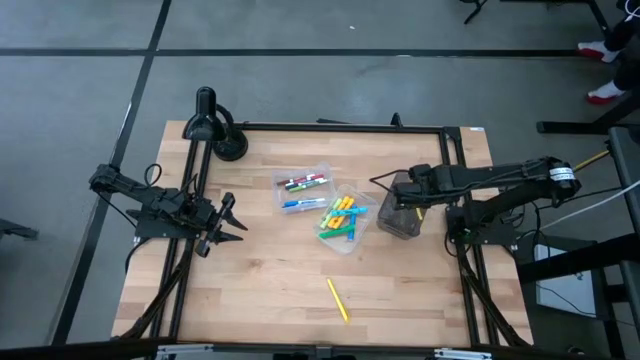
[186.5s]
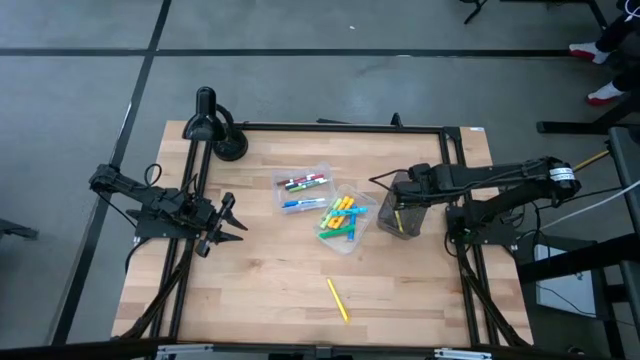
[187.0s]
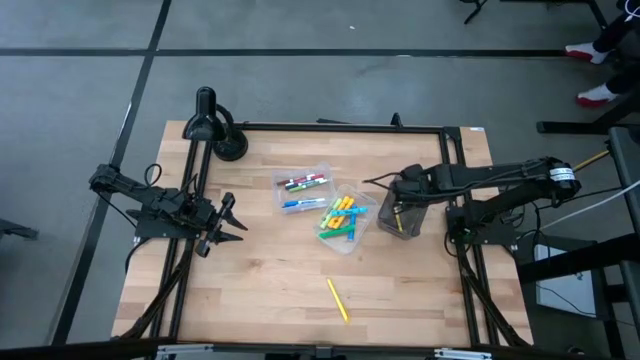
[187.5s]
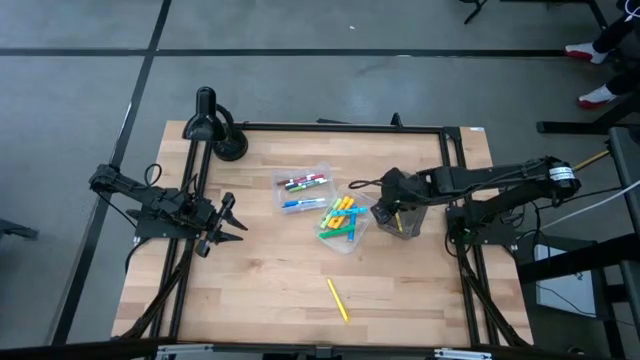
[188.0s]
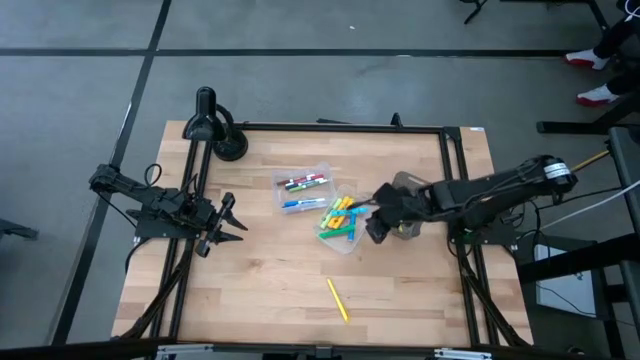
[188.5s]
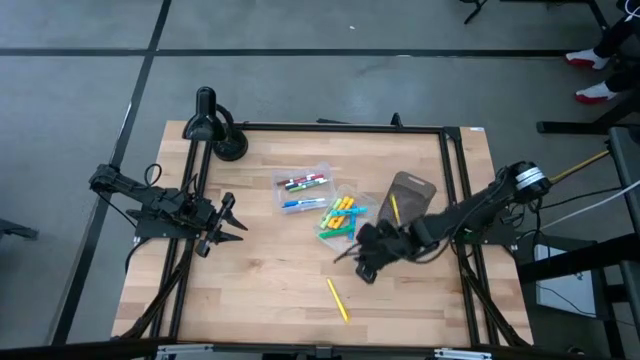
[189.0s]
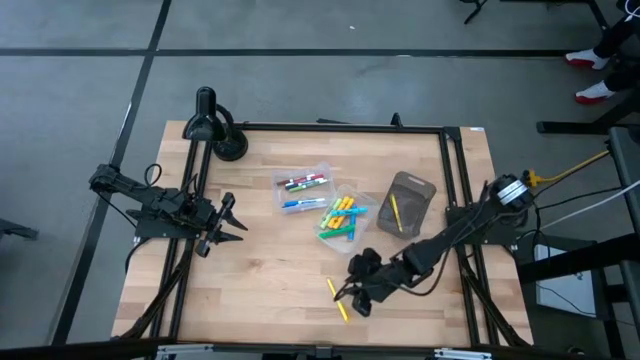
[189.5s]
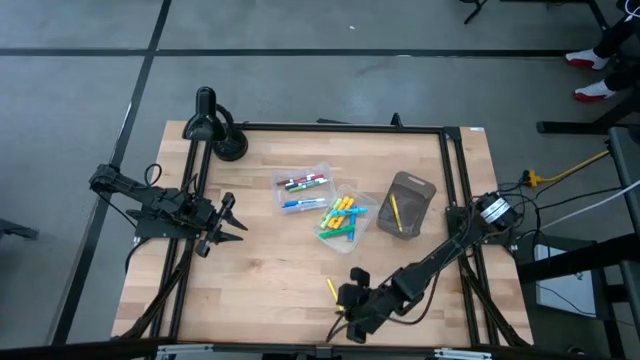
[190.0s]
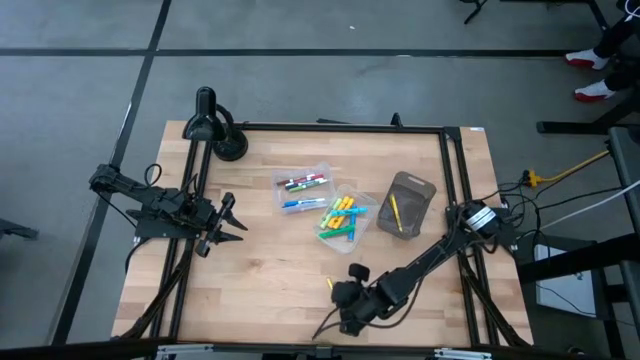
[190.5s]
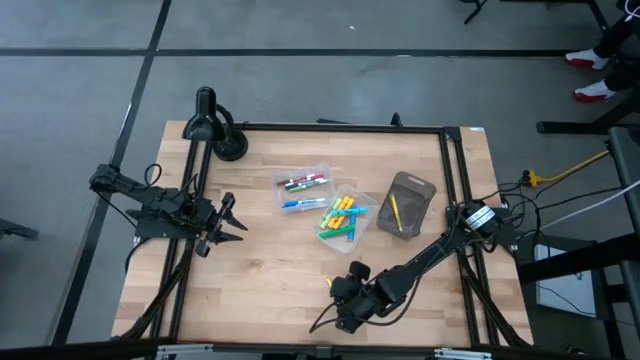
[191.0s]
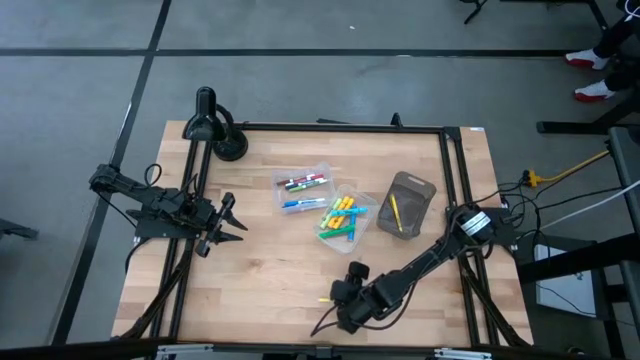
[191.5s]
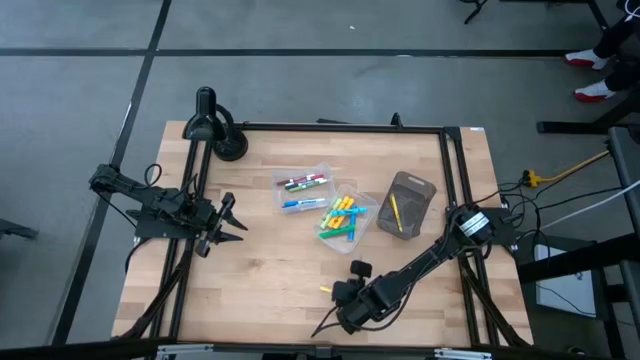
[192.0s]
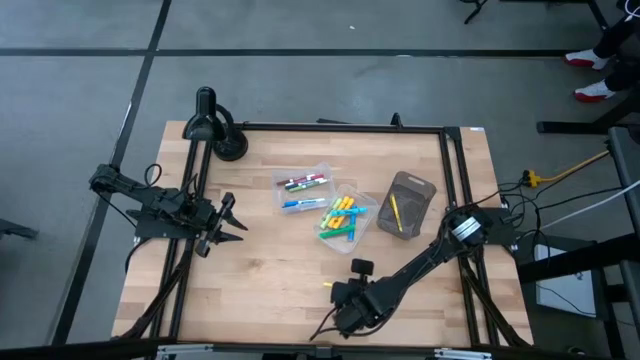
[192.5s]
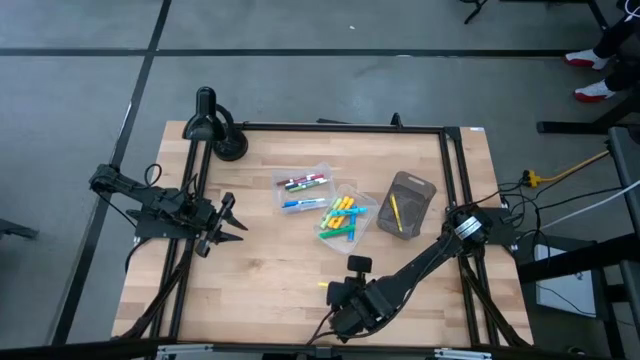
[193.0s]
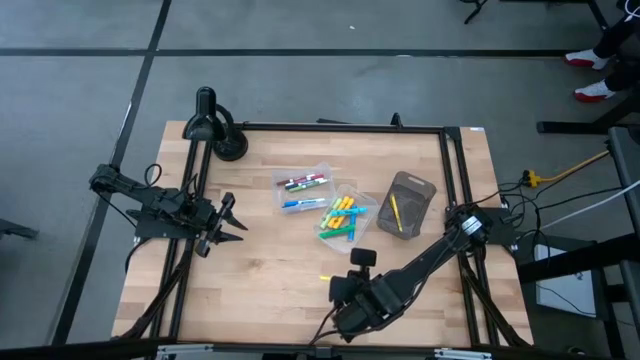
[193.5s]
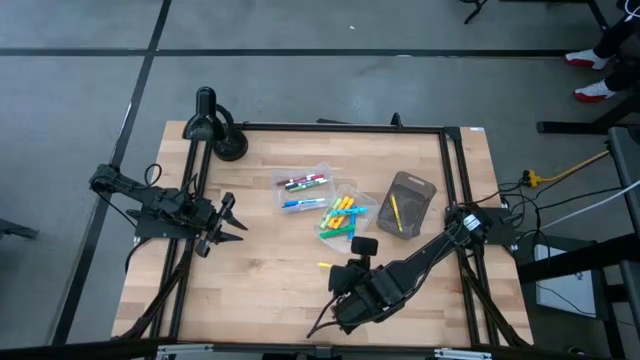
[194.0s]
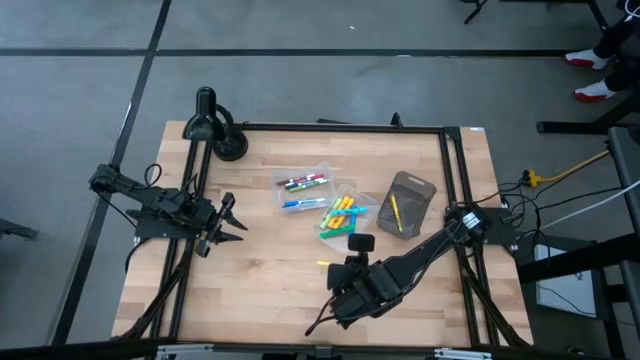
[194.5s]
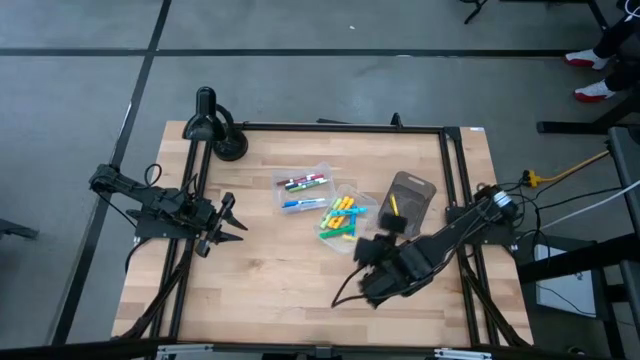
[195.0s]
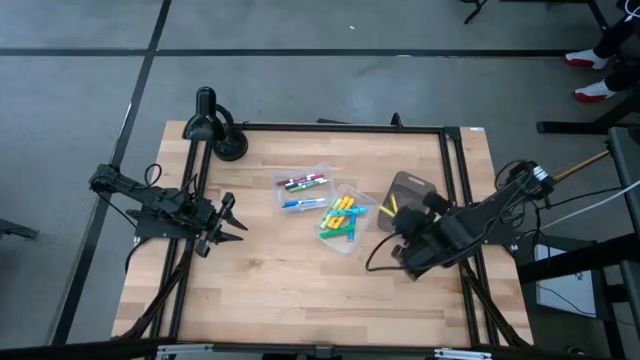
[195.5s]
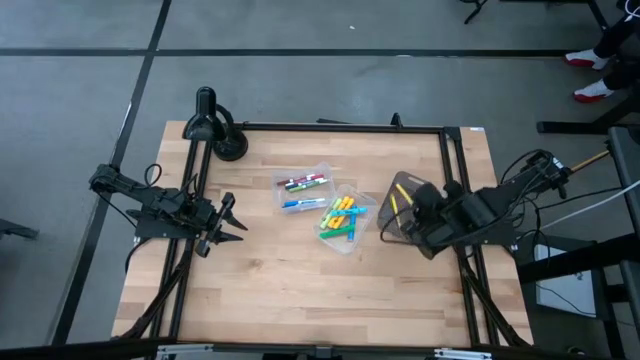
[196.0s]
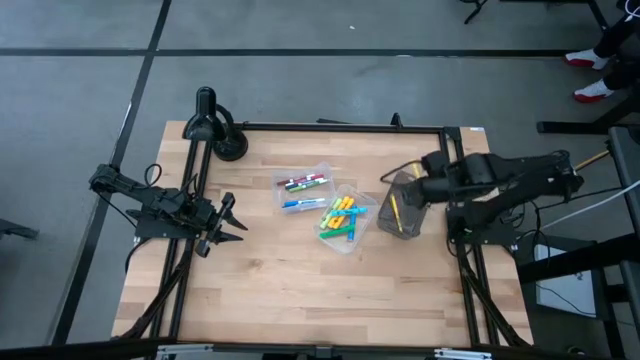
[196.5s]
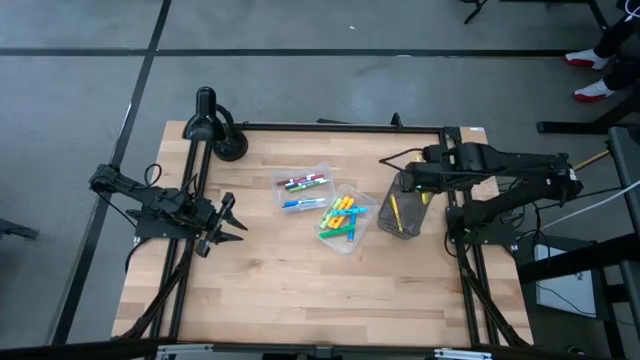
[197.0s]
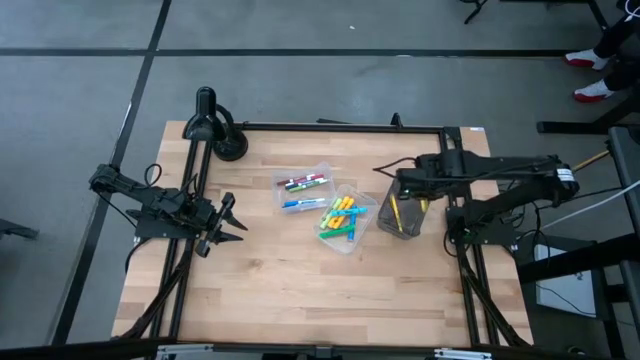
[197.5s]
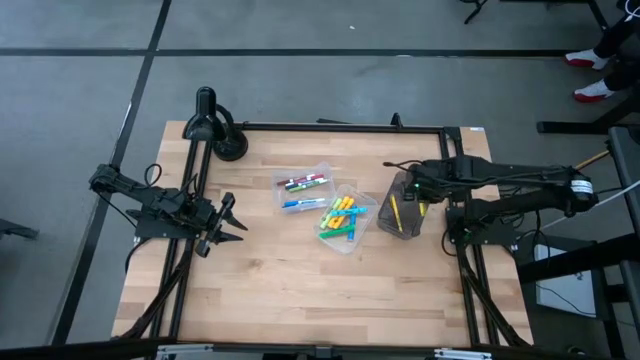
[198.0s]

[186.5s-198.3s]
Task: Pick & Place Markers
Put the yellow pen into the black bin

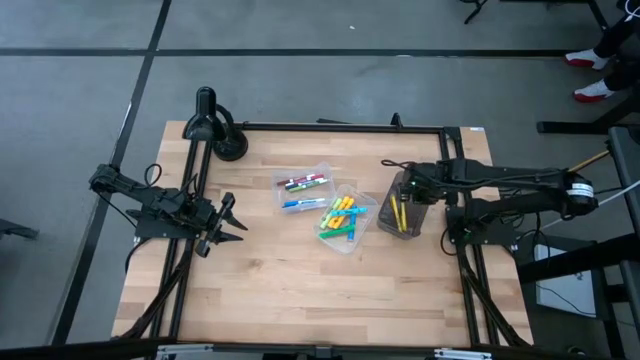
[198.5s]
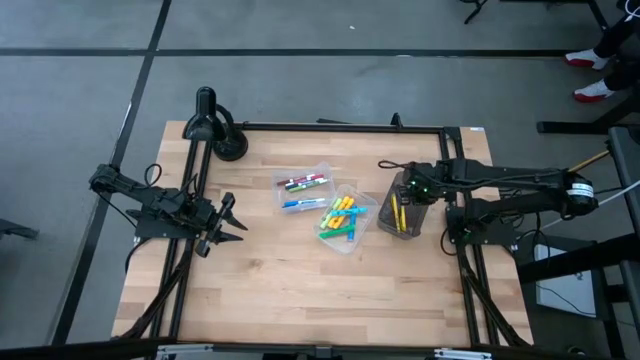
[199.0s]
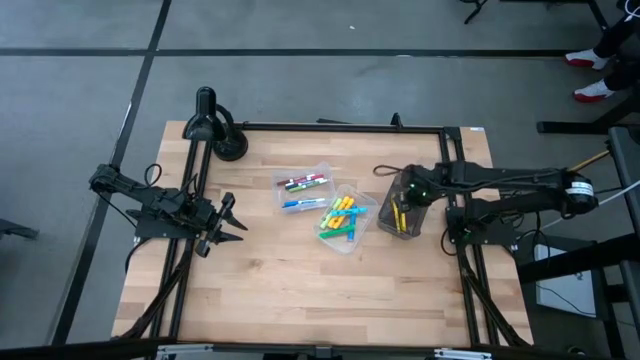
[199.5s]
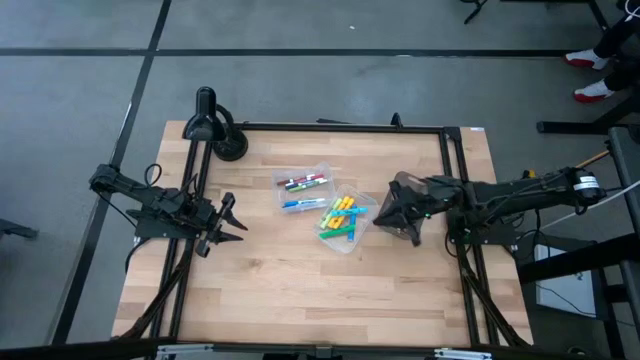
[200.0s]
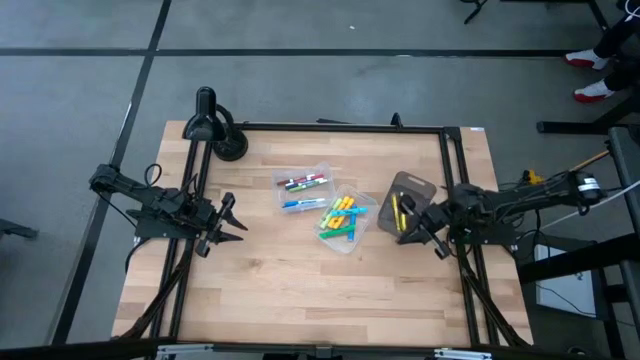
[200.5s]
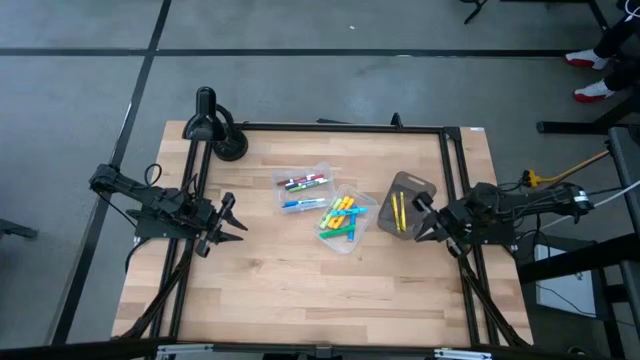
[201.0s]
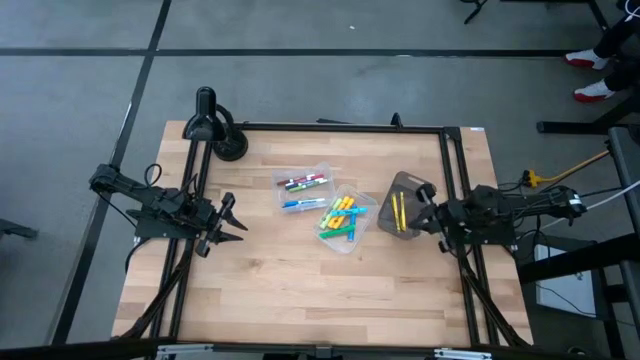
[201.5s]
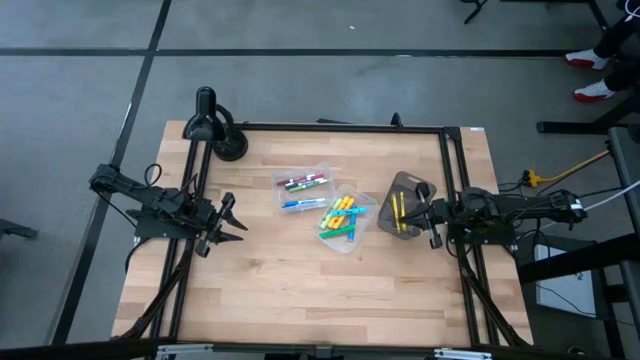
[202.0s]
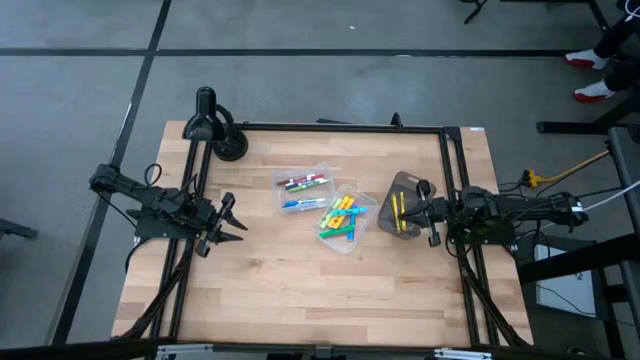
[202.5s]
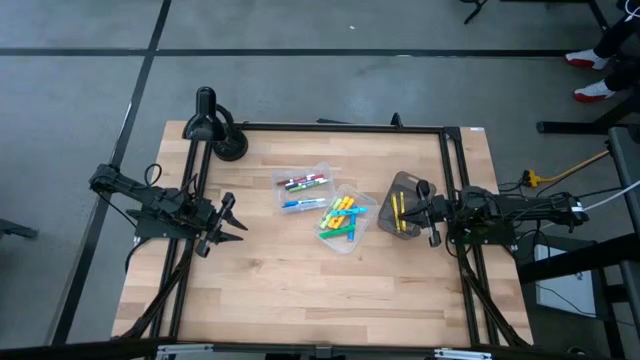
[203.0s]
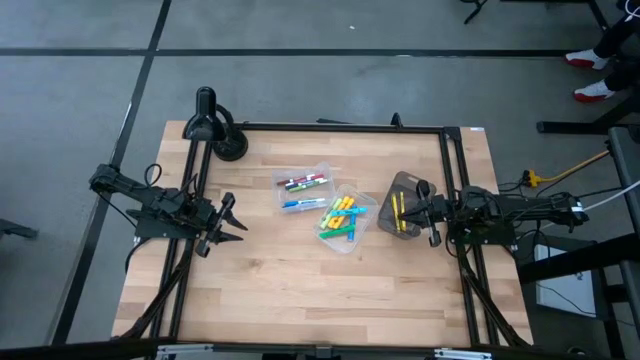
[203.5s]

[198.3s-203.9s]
Return to Home Position

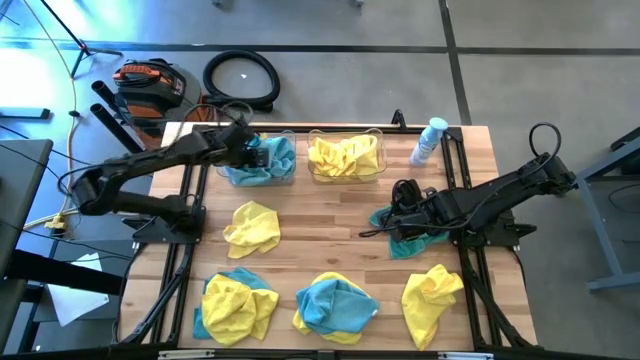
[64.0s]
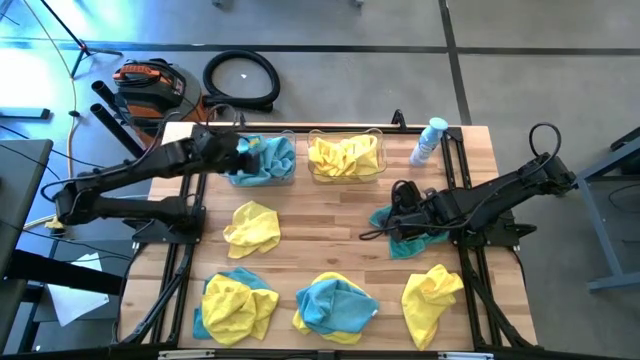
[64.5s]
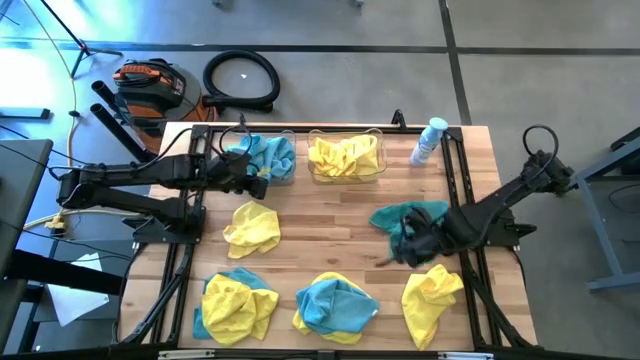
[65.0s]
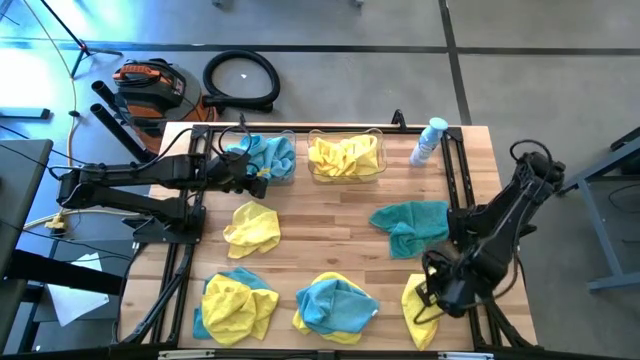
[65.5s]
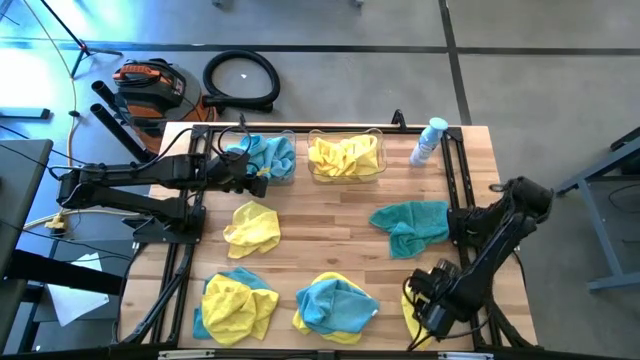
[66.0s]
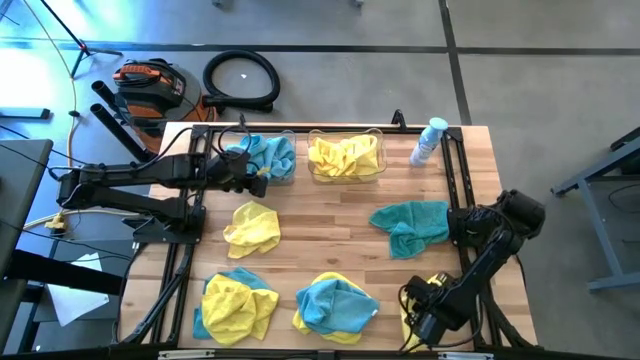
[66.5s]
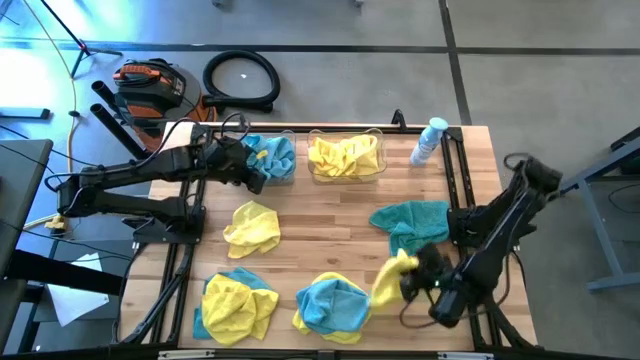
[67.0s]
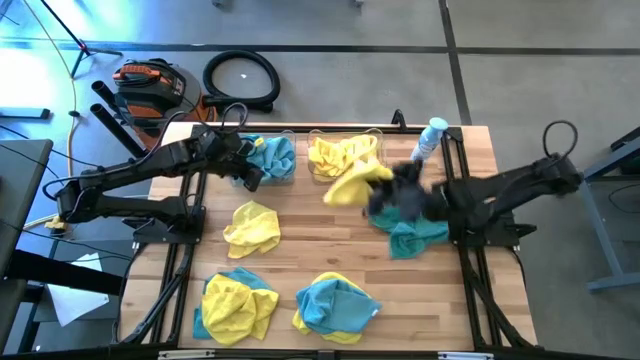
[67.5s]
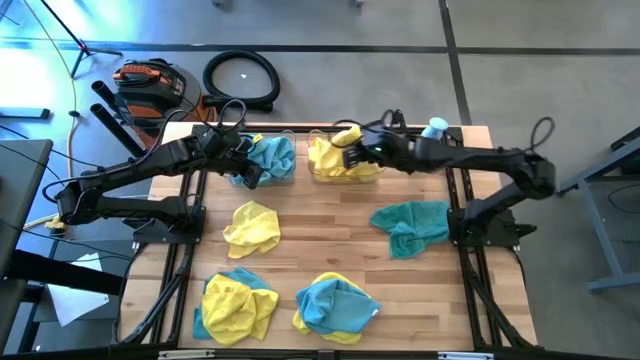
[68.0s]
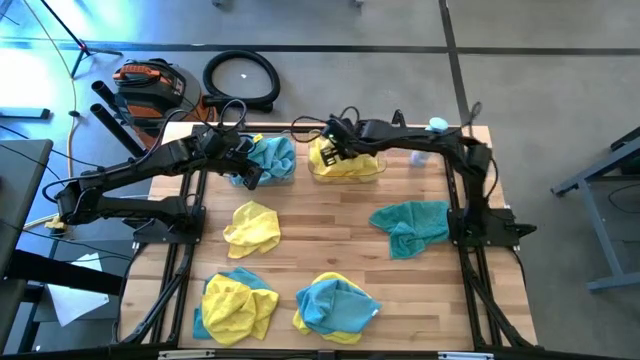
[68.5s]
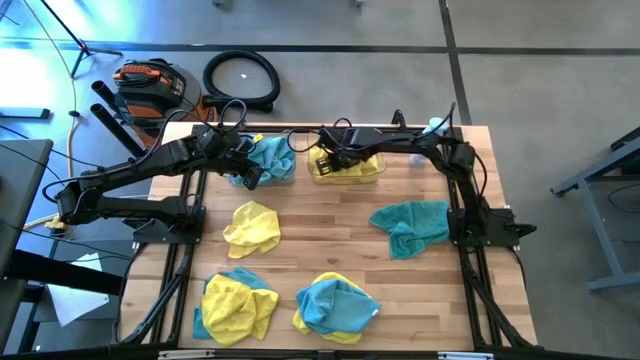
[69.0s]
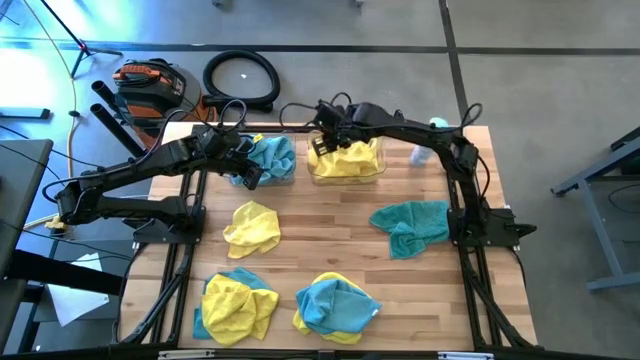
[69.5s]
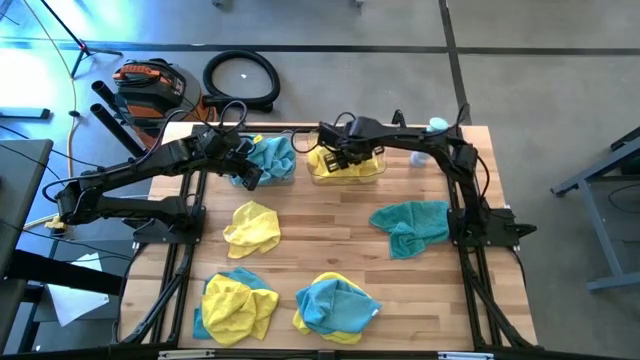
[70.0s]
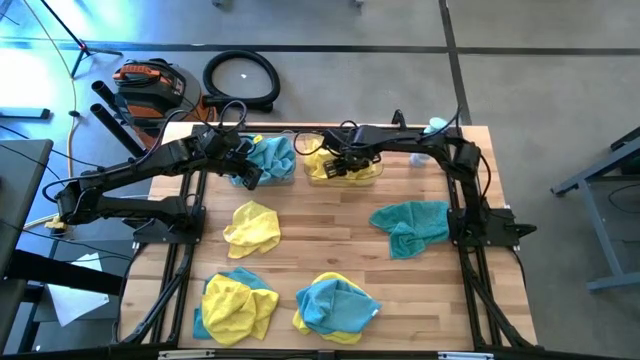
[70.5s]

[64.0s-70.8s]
Task: Sort microfiber towel by color & place in baskets
Put the yellow towel into the right transparent bin
